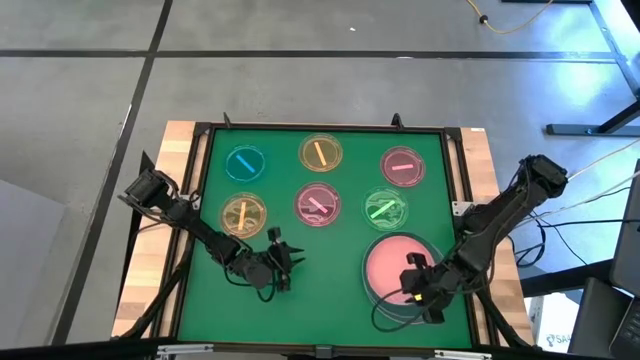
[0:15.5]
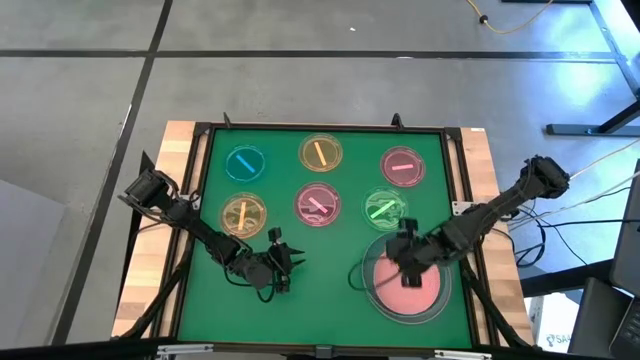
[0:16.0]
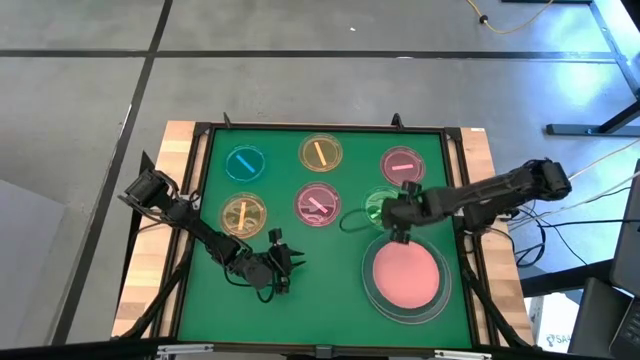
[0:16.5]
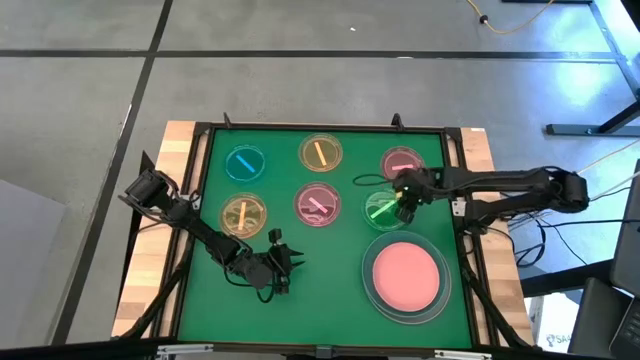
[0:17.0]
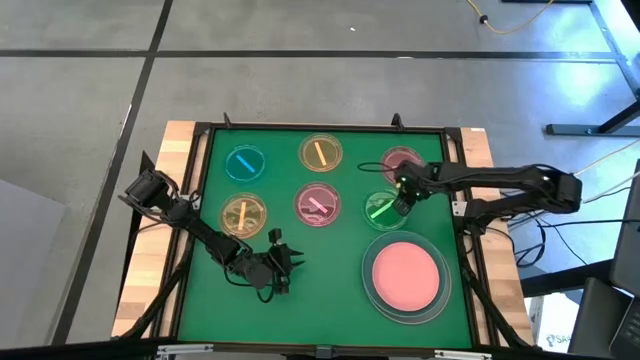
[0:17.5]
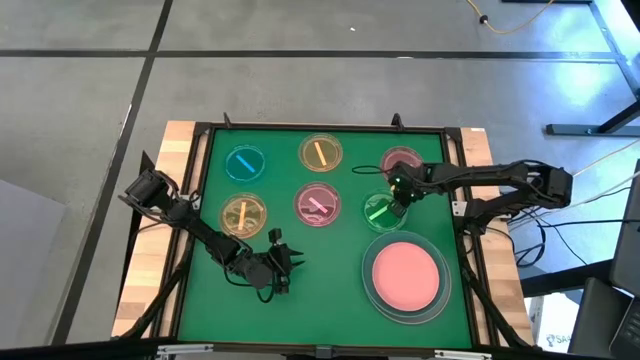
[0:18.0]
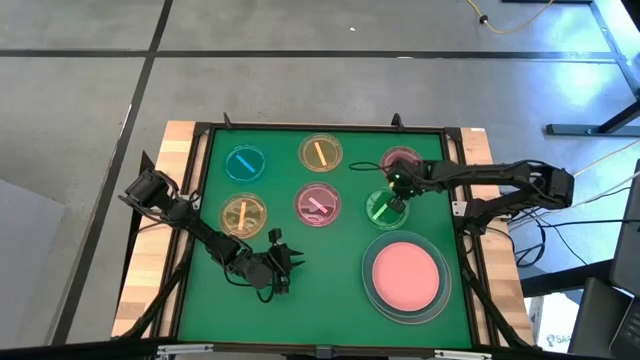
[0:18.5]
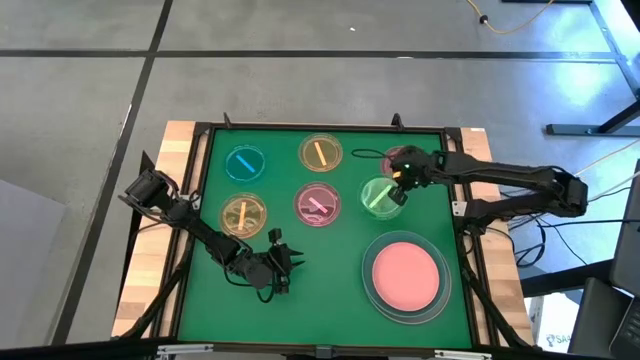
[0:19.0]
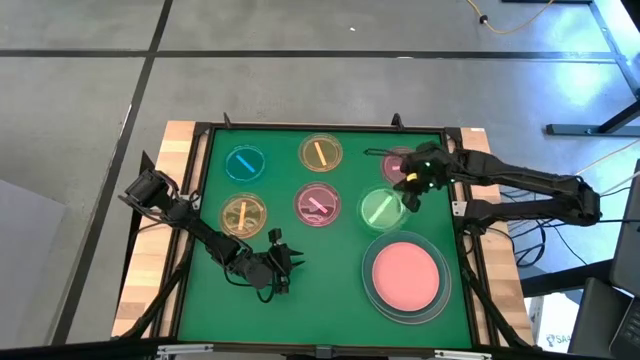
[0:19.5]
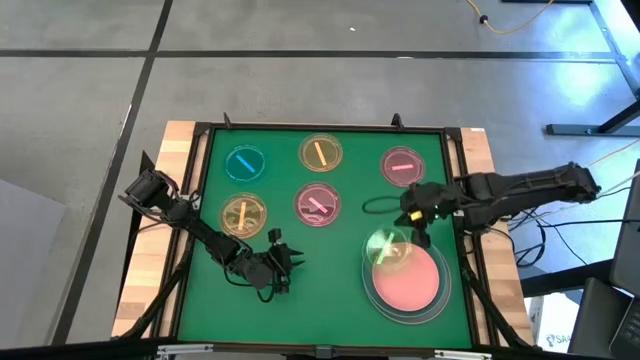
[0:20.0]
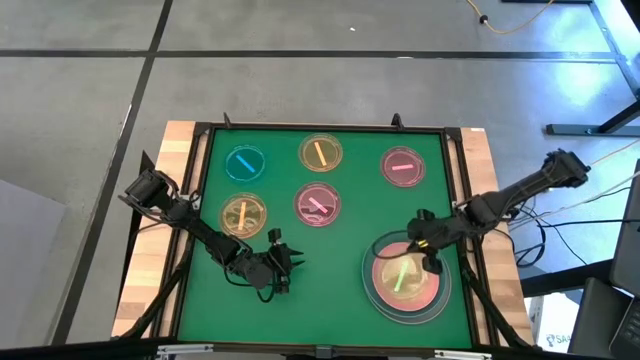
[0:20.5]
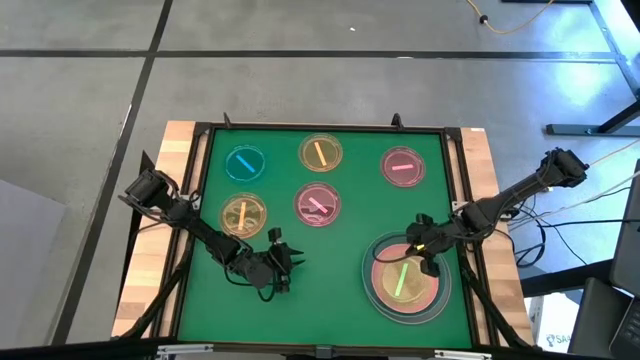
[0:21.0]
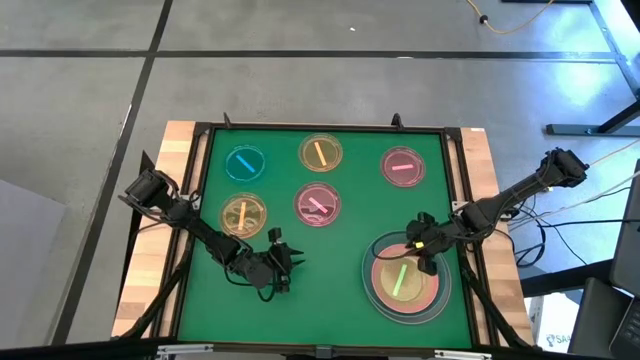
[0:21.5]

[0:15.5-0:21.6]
Task: Stack plastic plates
Stack the green plate on top of the light pink plate

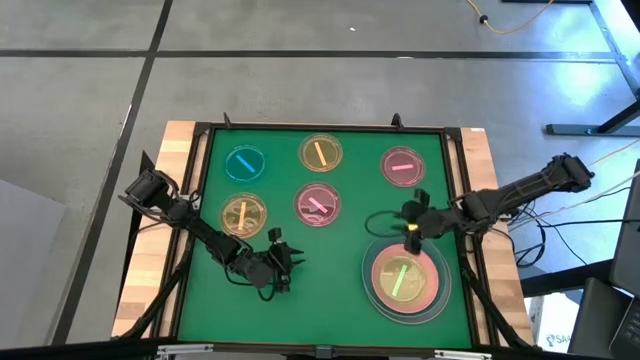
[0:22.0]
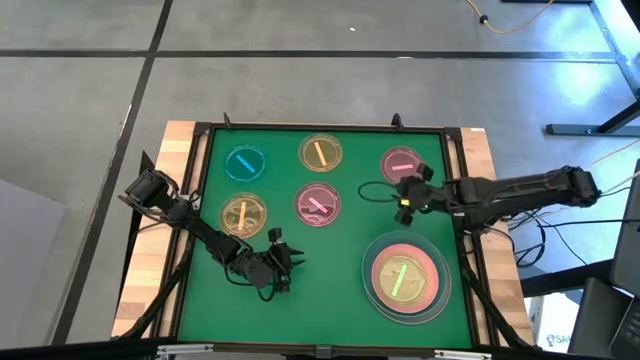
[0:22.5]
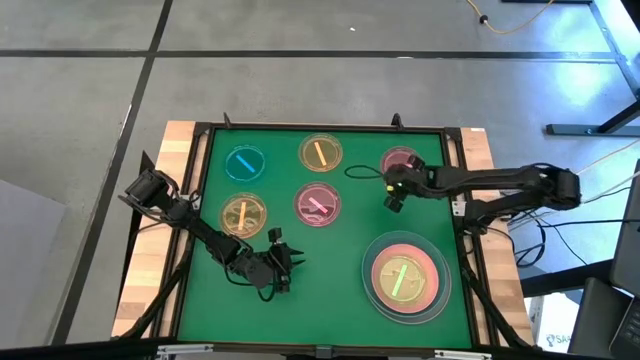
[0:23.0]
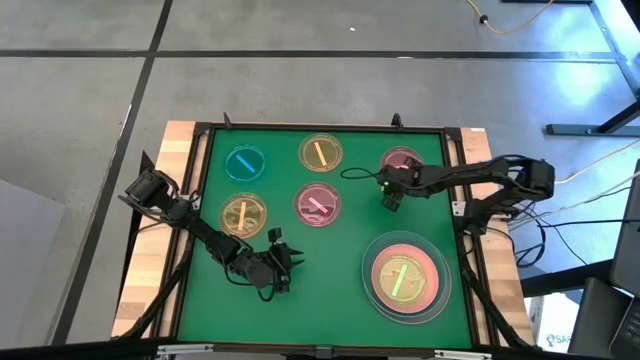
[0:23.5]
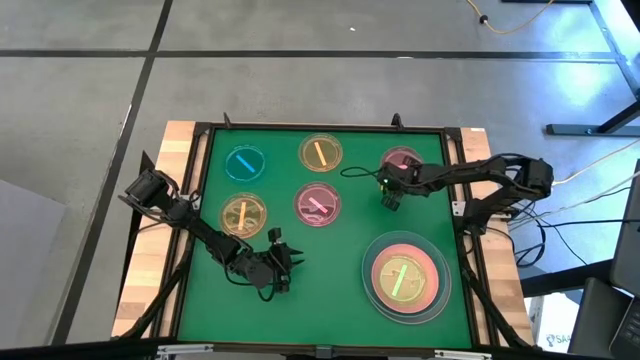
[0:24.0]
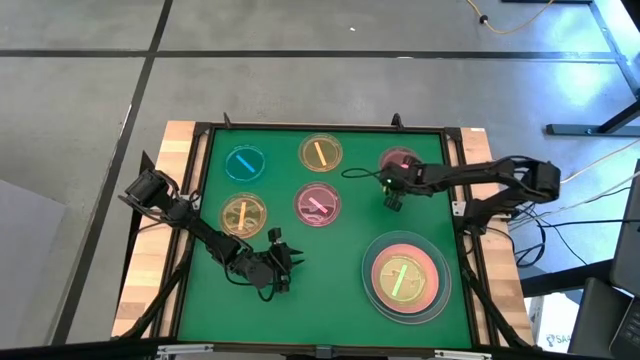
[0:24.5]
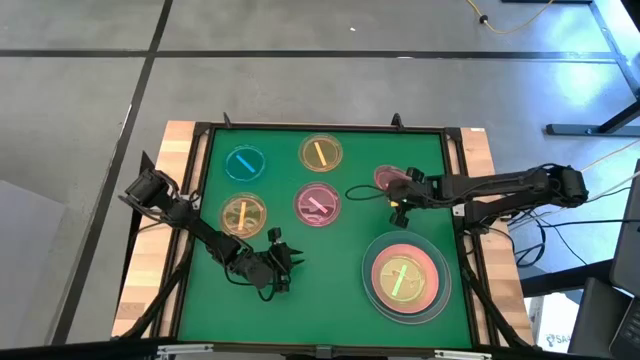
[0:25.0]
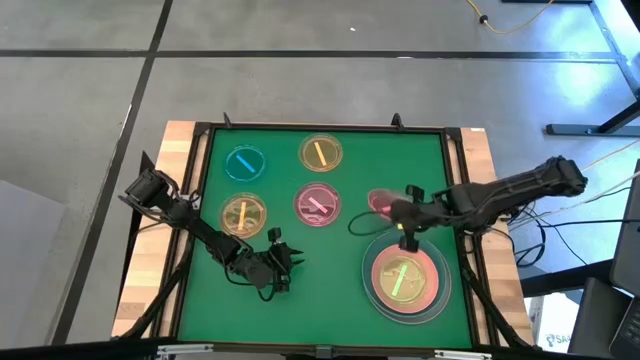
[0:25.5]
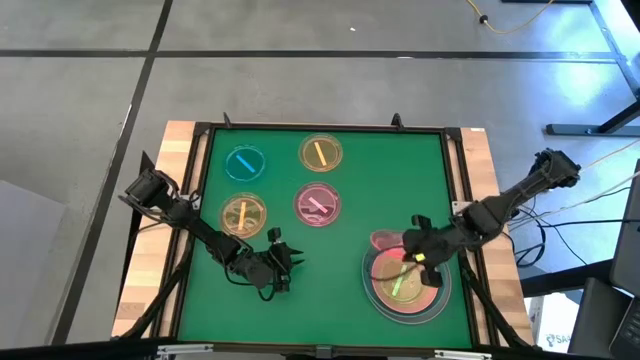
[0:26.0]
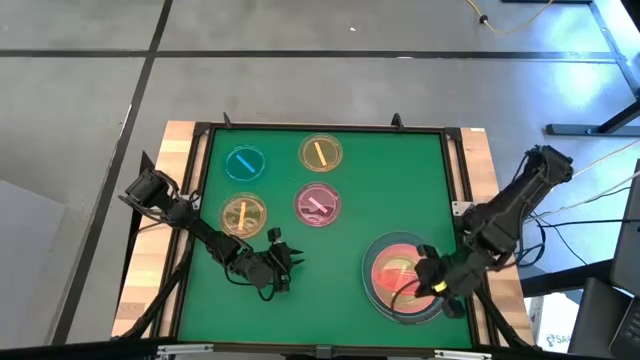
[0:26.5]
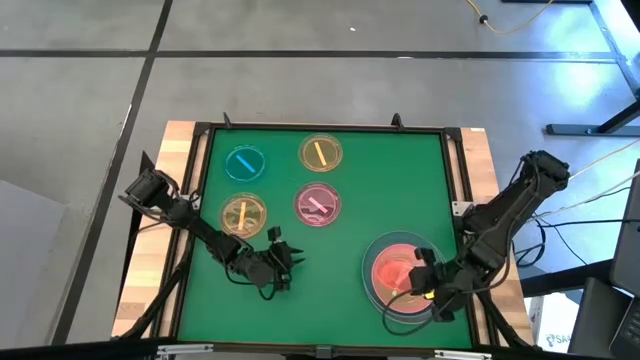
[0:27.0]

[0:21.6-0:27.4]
Stack the right pink plate on top of the green plate

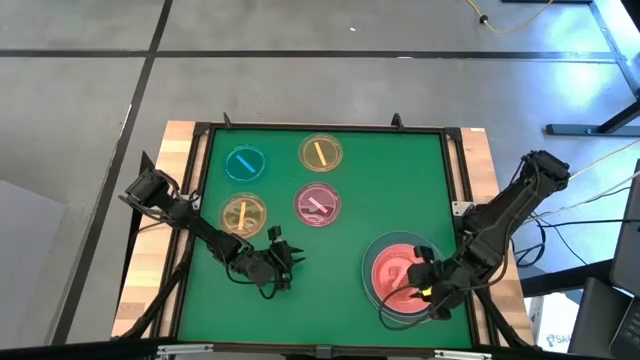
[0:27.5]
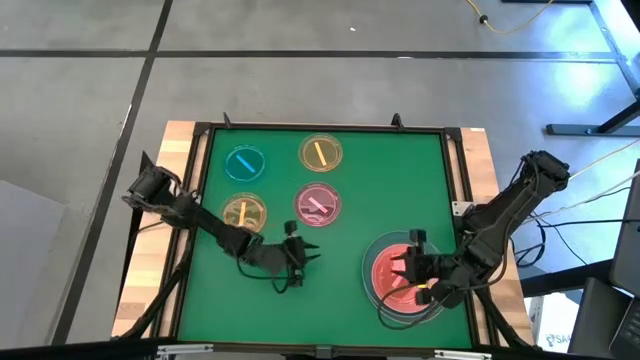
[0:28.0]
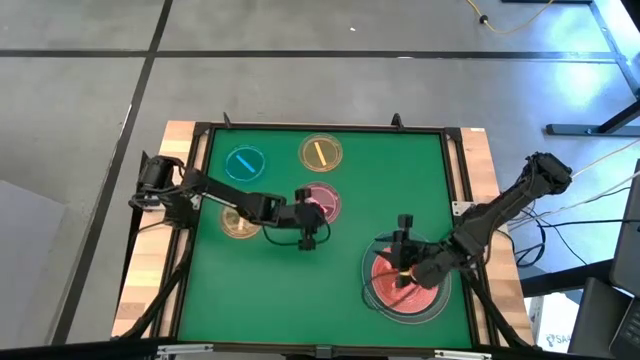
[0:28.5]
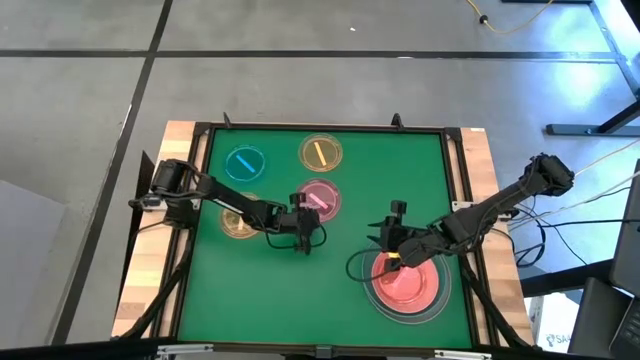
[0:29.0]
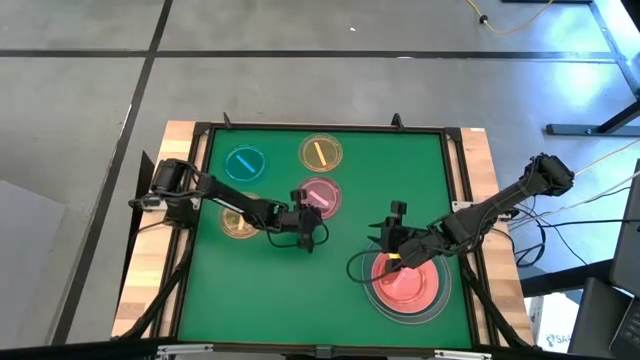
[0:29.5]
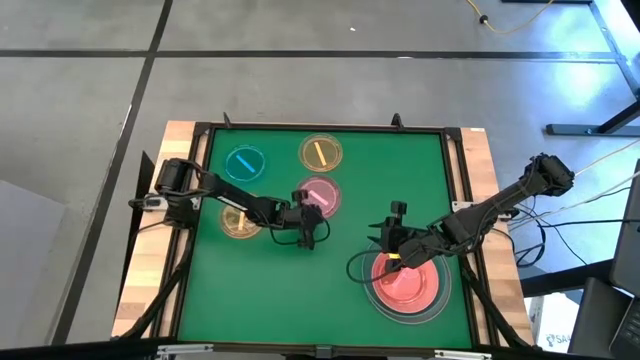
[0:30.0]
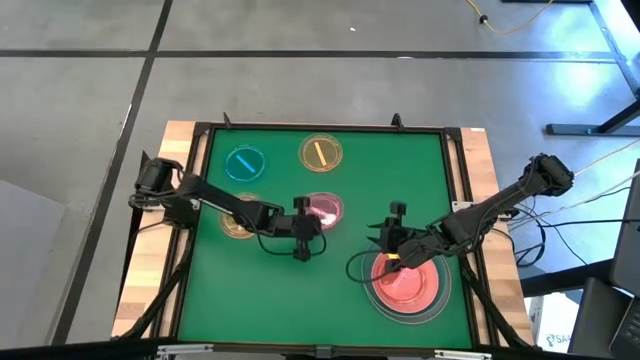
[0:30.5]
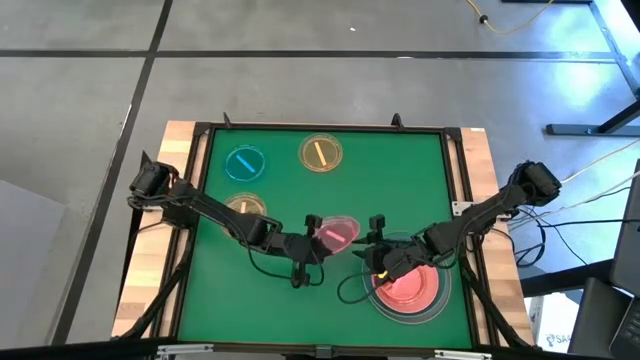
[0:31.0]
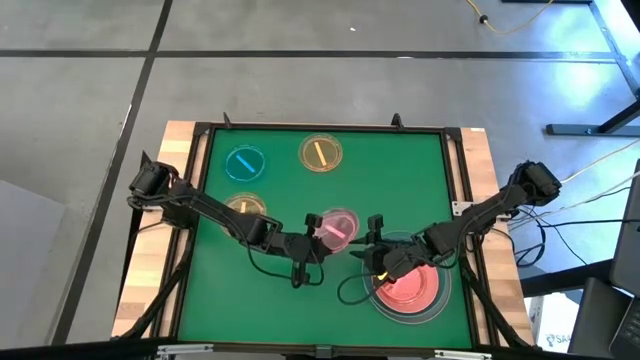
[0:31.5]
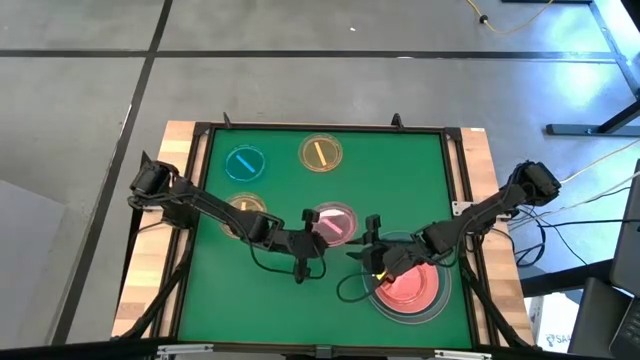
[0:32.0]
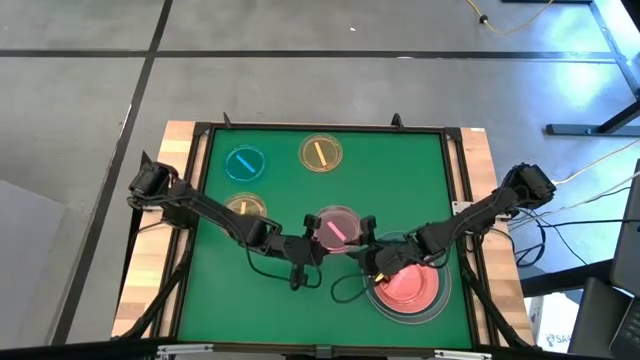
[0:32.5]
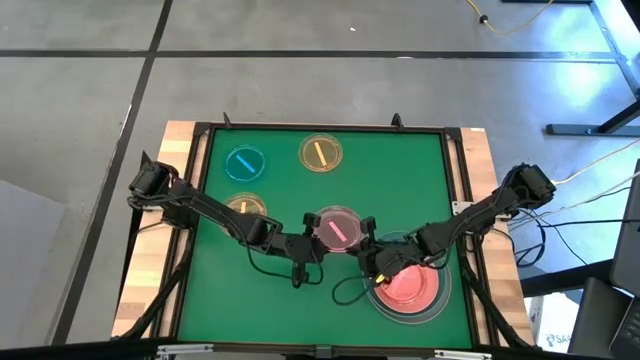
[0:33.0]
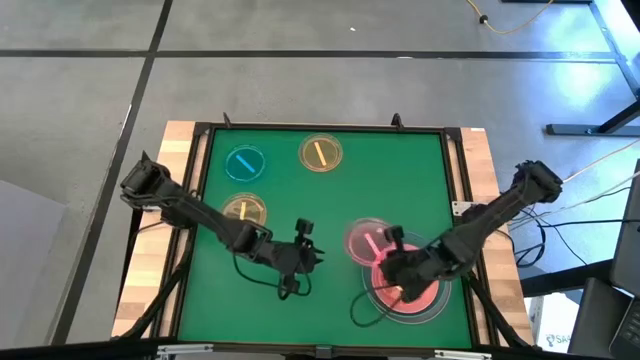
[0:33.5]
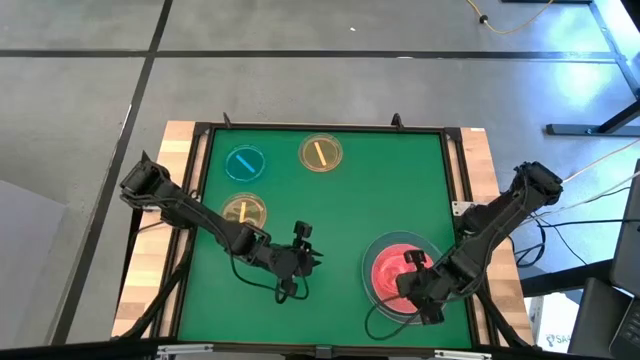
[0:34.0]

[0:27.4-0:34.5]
Stack the pink plate on top of the pink plate

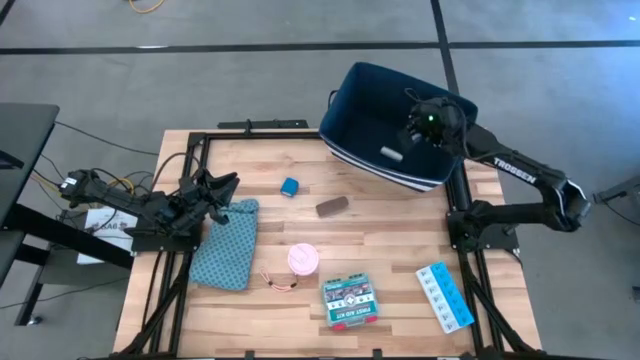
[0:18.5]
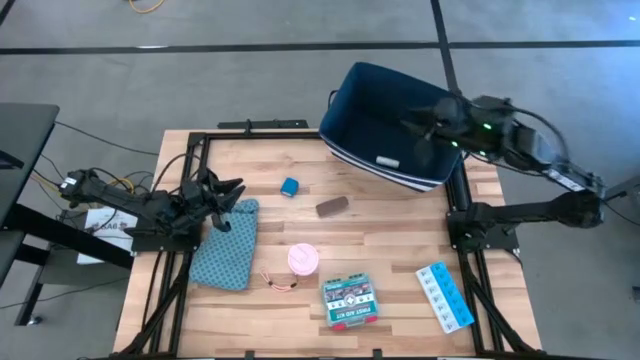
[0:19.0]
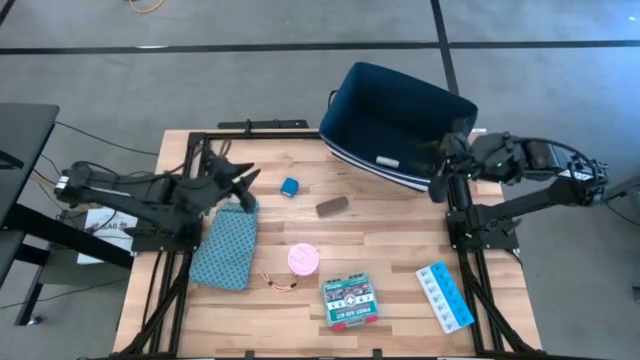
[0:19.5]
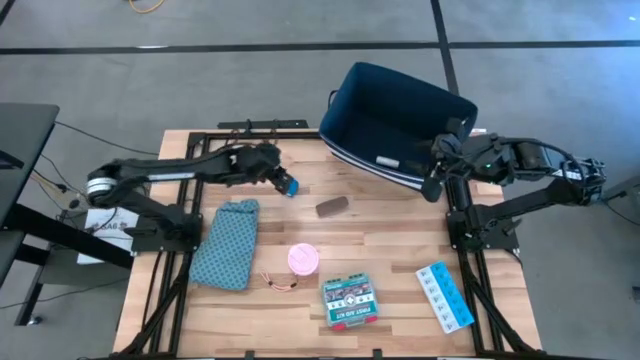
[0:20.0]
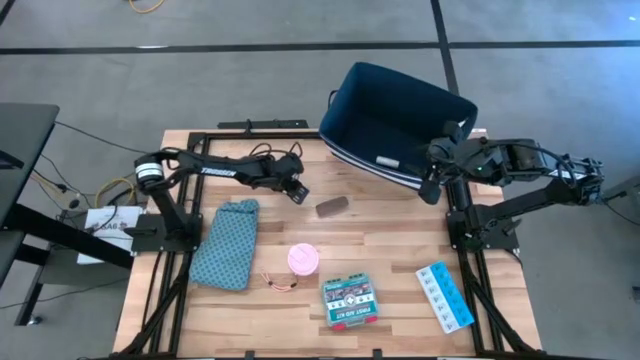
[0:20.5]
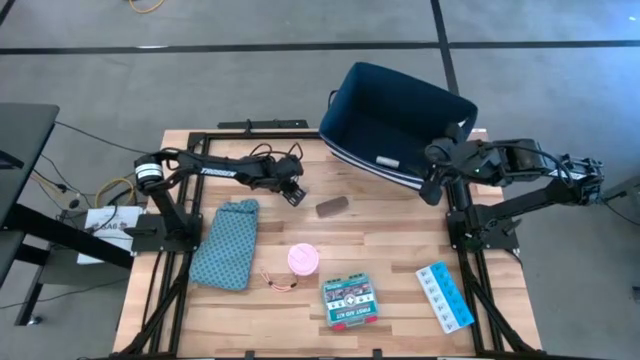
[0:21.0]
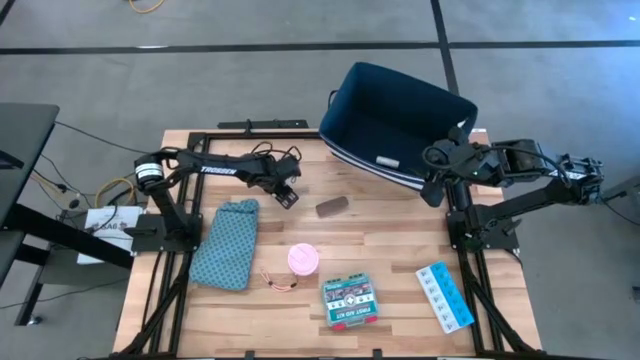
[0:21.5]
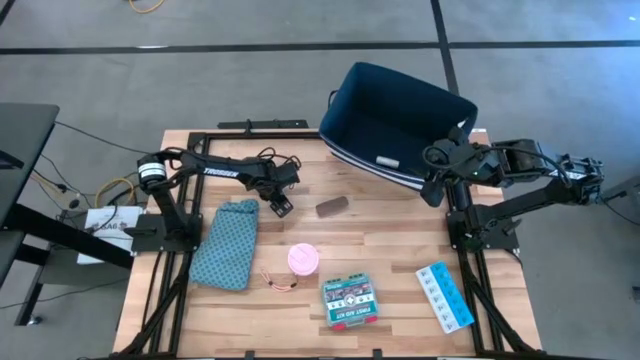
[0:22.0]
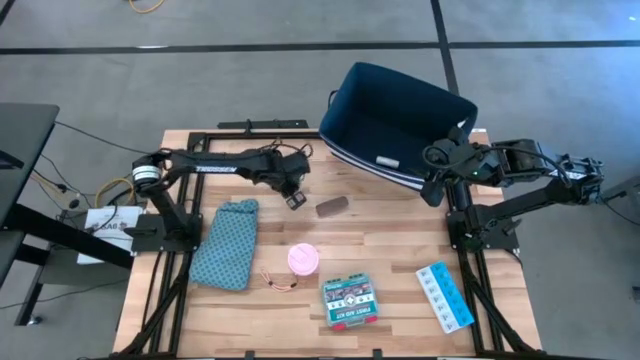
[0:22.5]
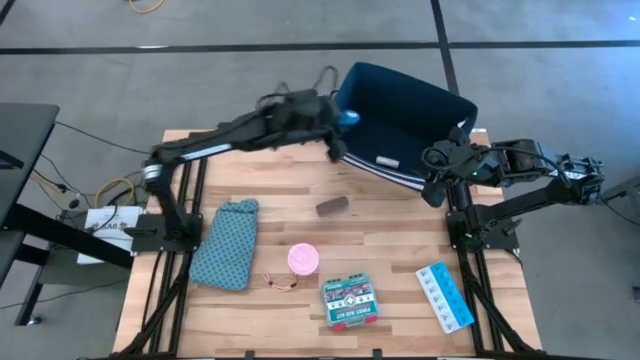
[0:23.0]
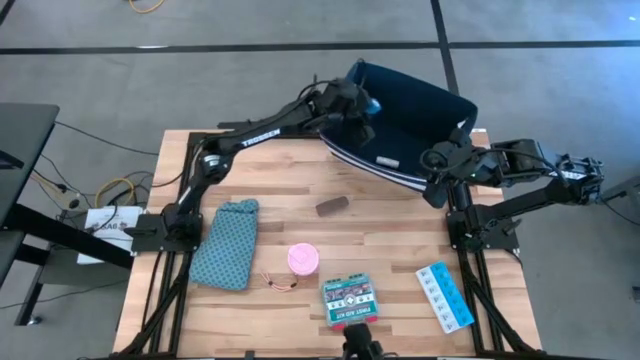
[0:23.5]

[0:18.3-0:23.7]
Task: Pick & place medical supplies in basket/bin
Put the blue bandage into the blue organizer bin
